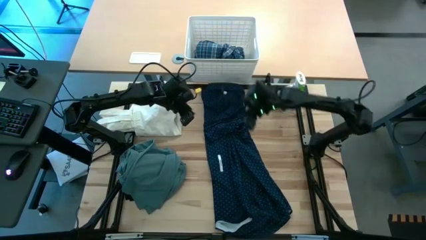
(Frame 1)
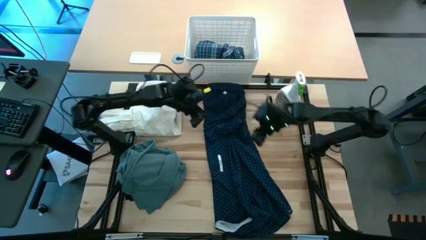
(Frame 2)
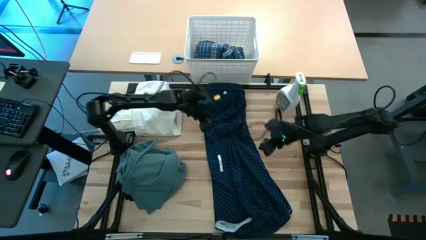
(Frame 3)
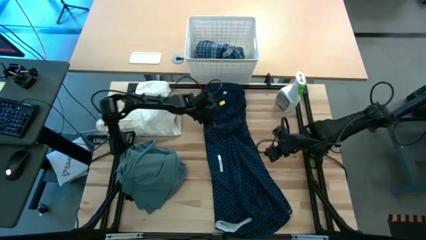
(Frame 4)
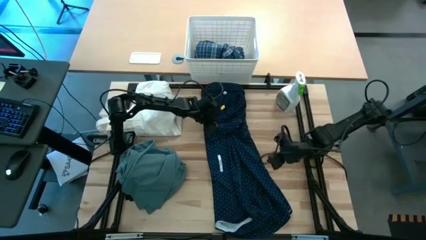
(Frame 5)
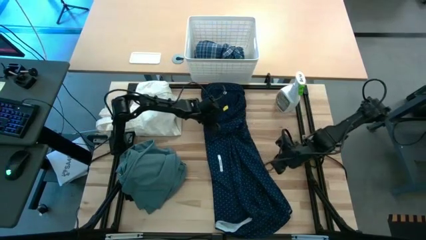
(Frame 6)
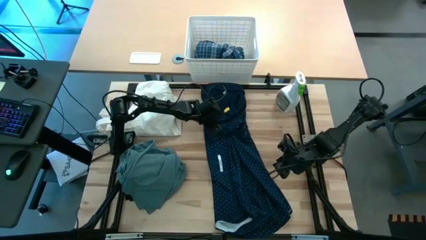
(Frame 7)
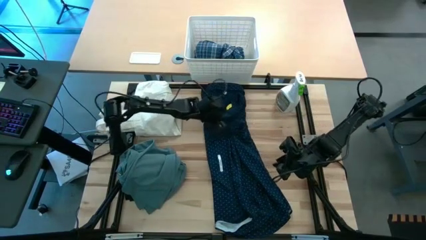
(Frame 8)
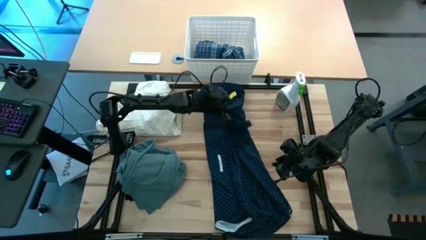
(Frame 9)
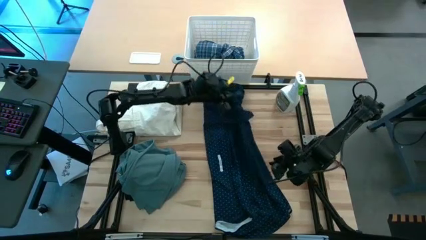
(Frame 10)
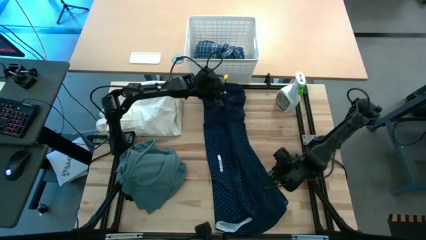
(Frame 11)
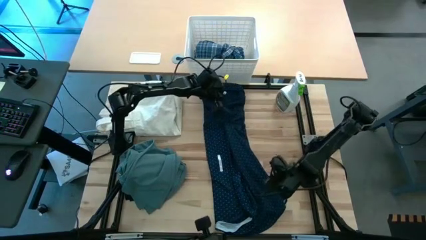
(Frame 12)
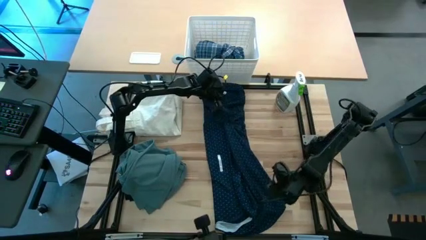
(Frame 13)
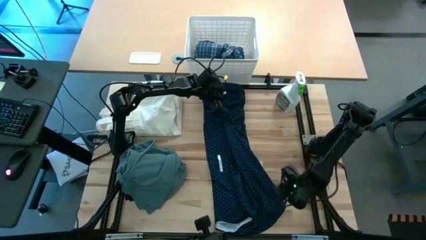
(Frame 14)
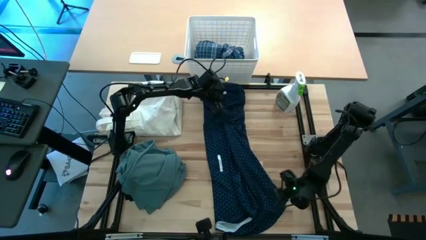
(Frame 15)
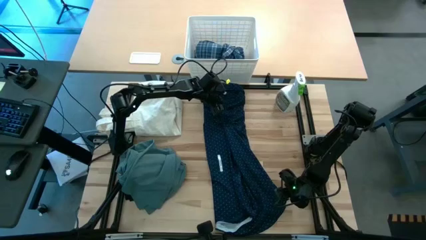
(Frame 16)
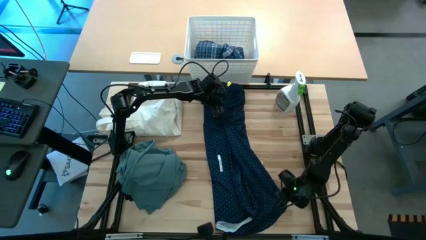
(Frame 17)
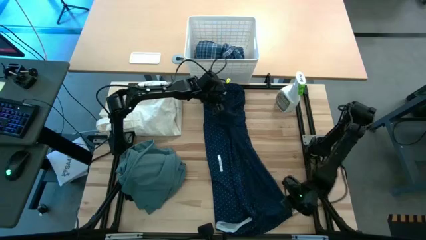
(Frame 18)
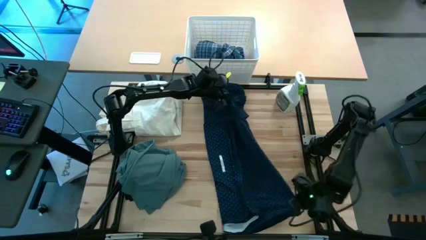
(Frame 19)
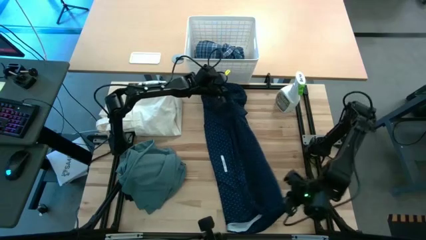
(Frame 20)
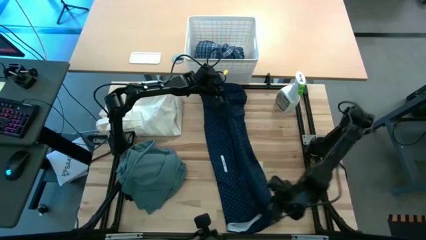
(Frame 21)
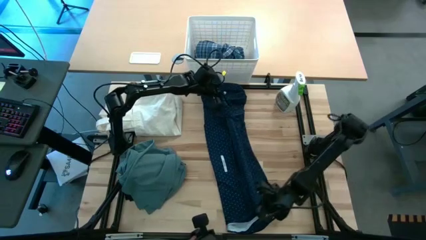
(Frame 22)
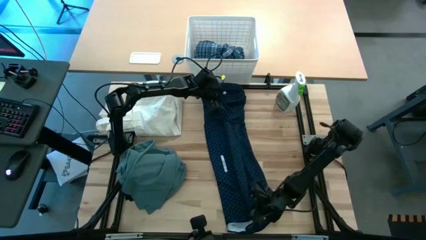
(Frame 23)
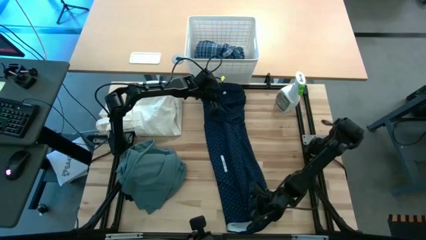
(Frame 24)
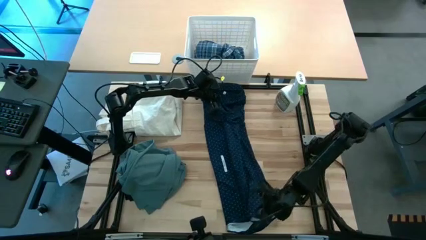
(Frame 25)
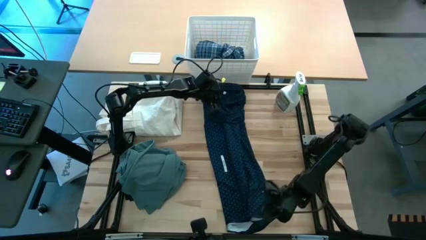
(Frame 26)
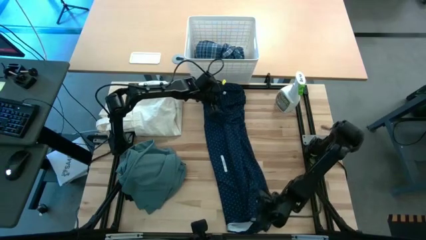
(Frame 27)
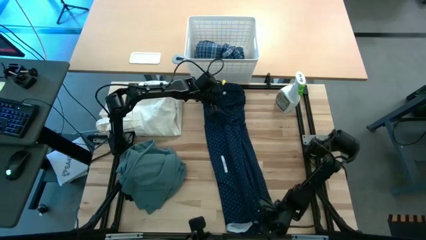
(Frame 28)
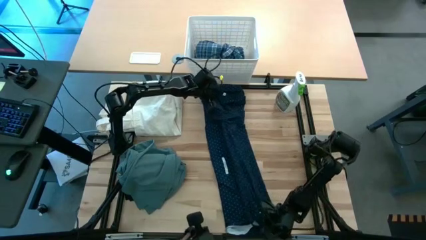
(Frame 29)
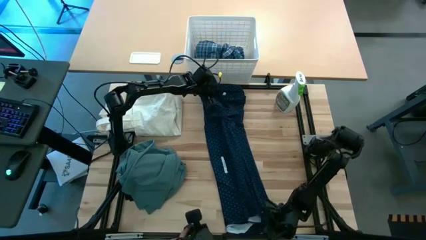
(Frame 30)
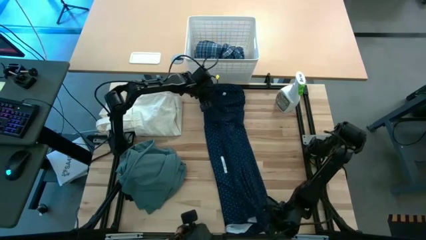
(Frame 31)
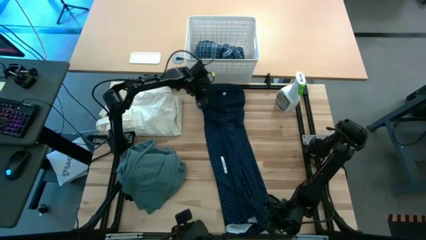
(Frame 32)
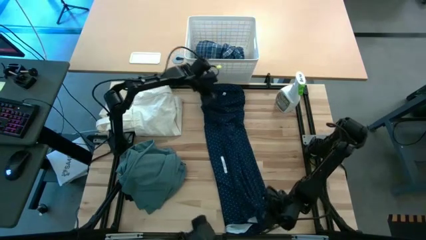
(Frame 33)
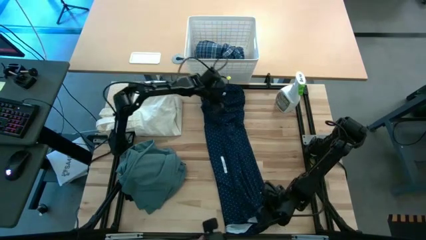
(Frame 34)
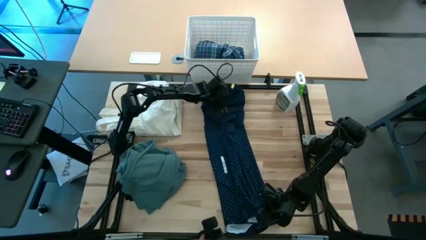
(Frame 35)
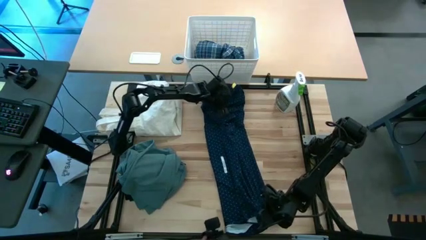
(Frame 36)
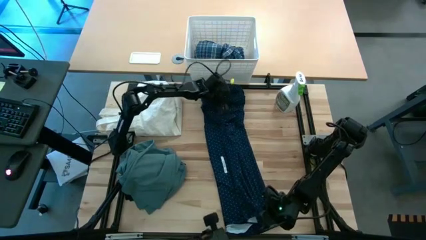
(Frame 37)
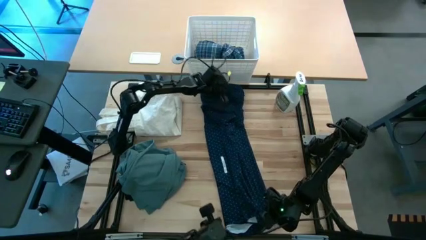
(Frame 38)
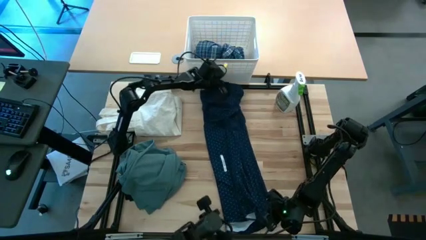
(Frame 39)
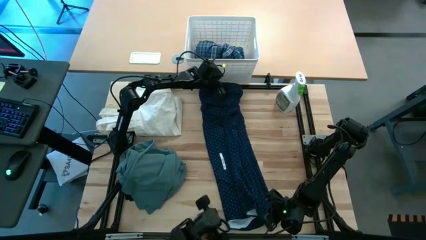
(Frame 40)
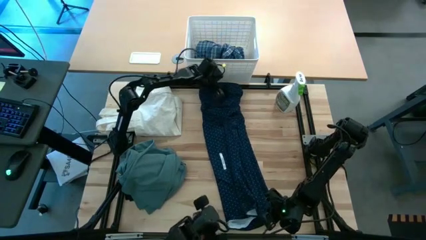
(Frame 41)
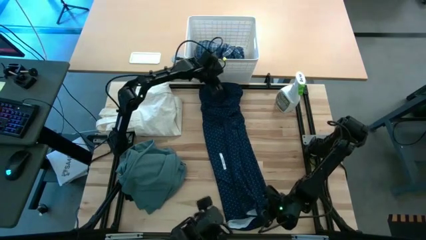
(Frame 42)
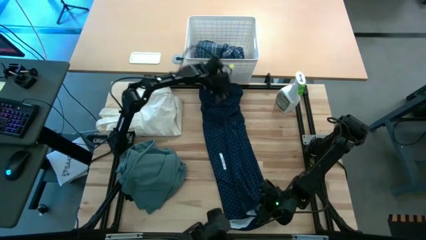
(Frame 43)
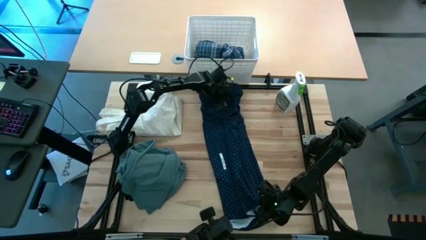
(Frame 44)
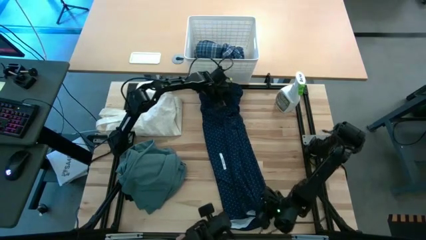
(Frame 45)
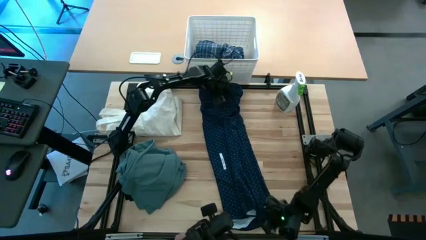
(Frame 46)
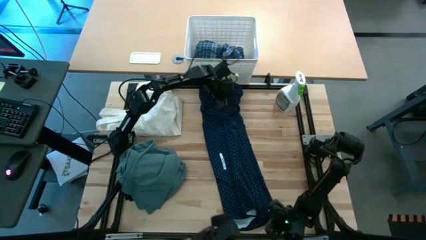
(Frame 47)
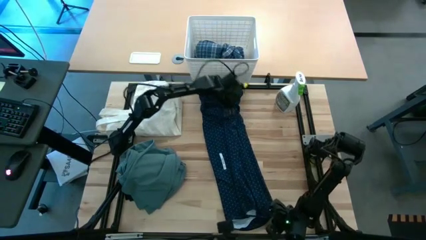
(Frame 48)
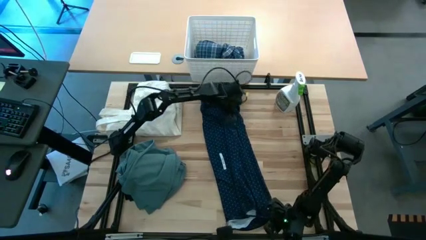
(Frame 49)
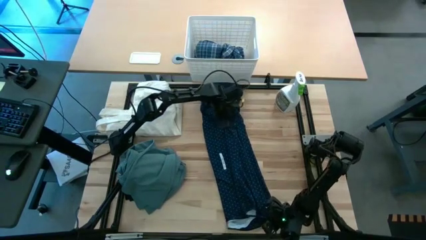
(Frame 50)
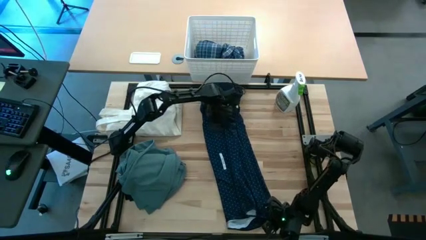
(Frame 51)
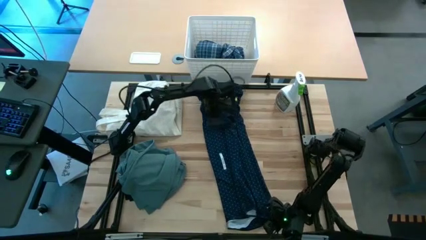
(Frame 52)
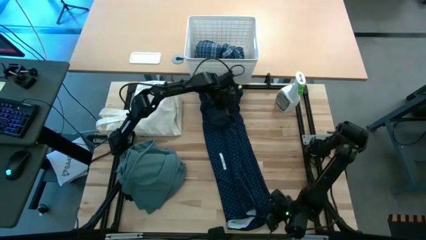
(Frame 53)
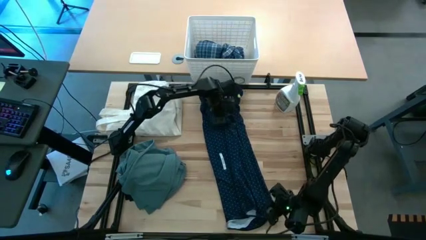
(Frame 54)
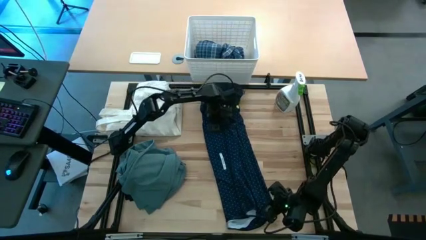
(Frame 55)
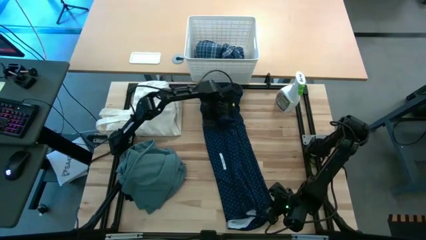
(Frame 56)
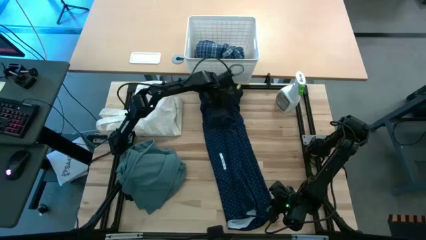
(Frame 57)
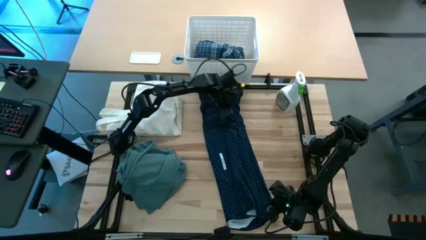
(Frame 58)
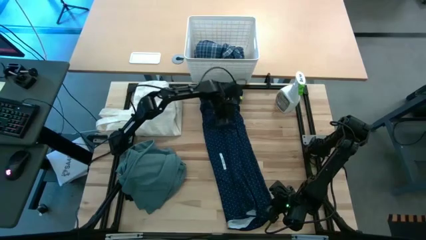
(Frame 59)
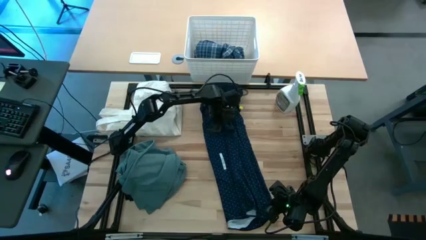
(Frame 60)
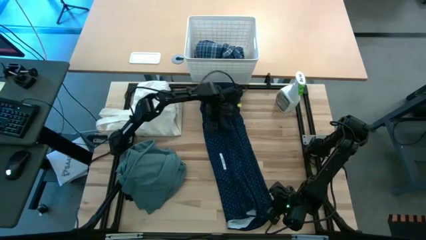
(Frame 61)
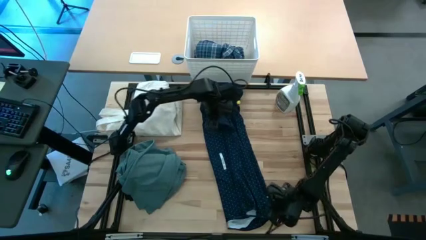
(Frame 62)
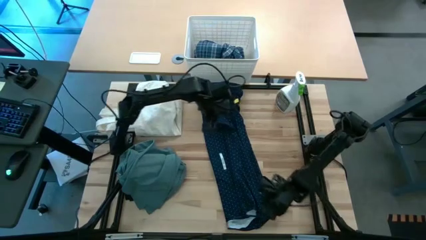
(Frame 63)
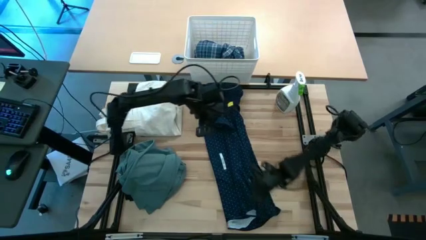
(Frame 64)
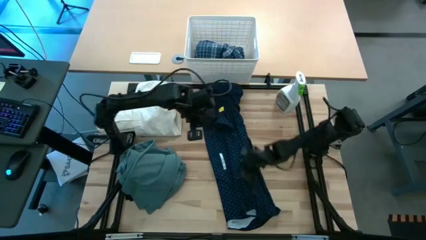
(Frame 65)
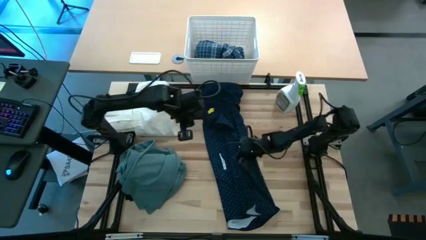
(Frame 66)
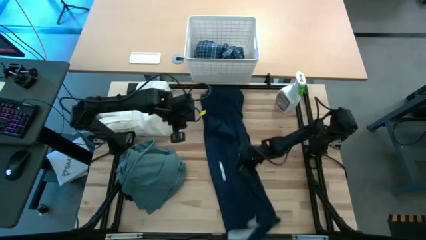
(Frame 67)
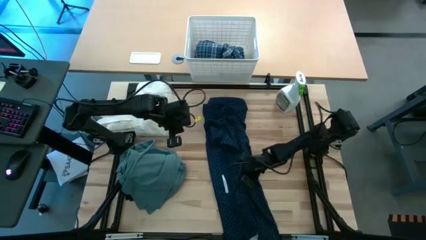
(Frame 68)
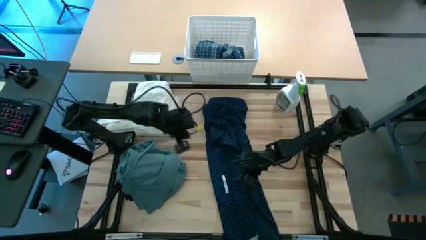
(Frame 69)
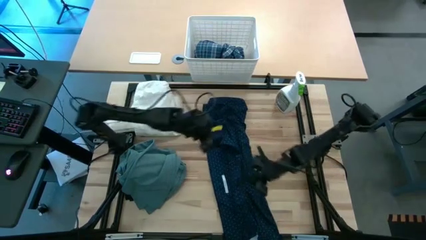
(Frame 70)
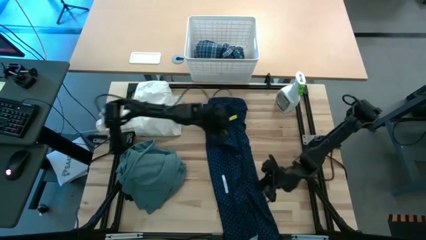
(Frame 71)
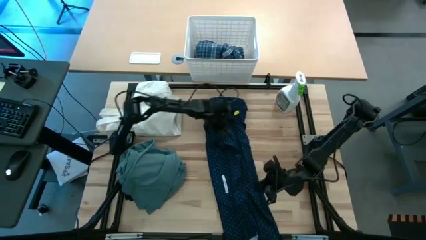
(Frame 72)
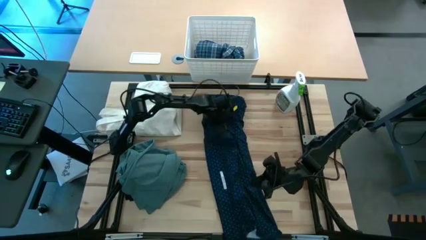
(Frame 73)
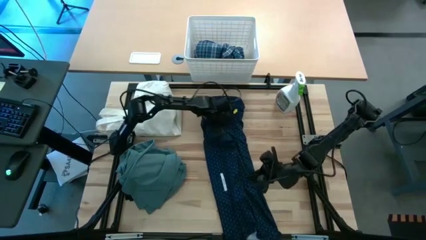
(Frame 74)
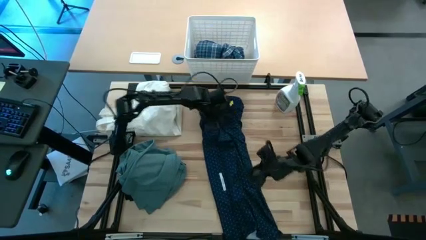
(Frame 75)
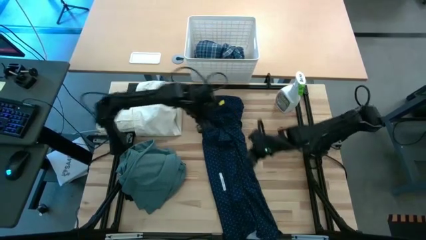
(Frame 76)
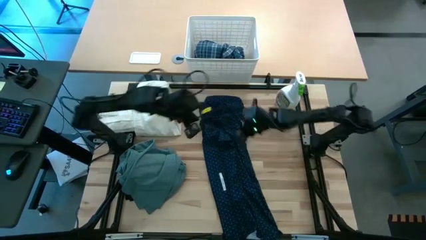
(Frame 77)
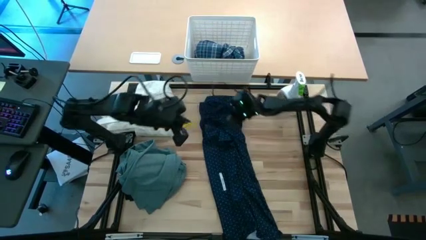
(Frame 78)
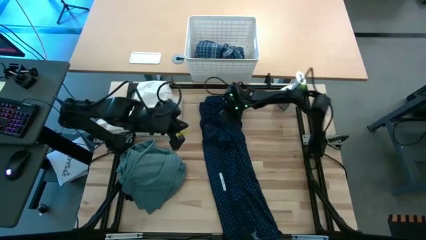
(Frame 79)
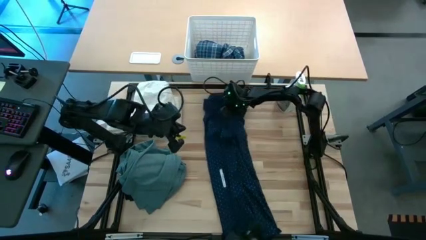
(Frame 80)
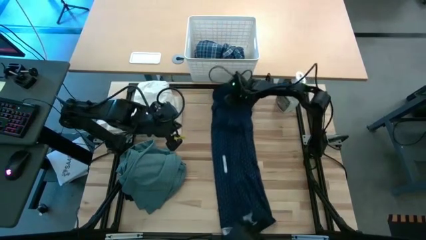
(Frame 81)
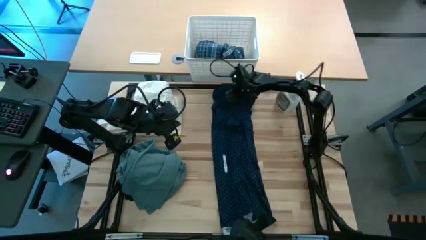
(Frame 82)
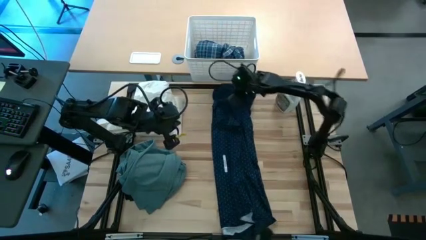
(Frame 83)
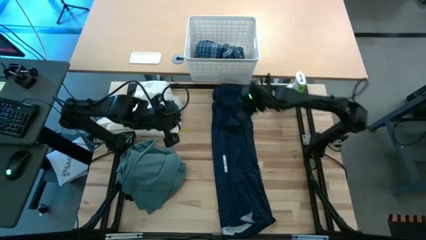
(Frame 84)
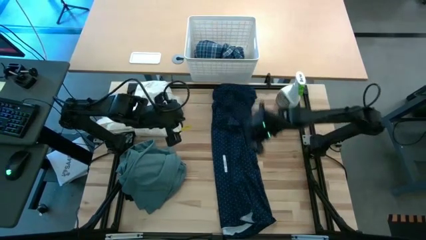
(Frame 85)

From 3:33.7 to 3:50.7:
Fold the dark blue polo
